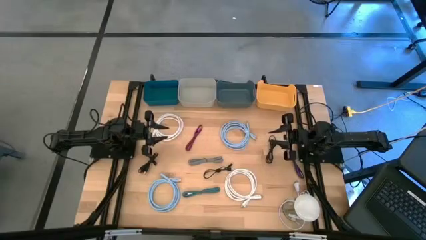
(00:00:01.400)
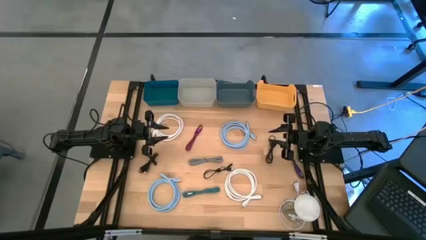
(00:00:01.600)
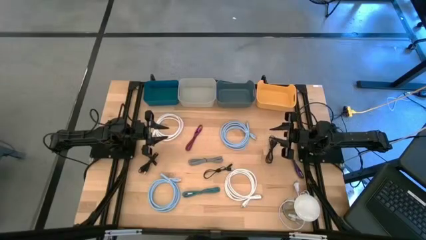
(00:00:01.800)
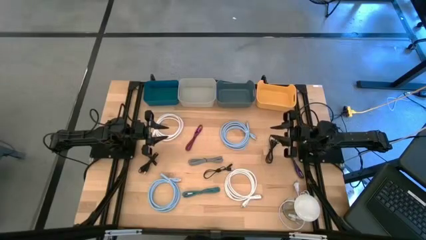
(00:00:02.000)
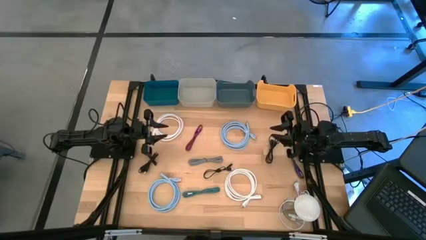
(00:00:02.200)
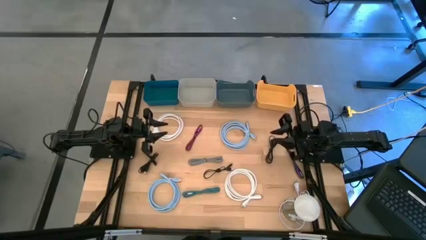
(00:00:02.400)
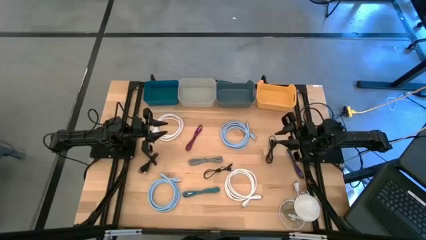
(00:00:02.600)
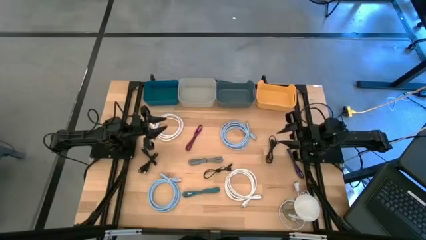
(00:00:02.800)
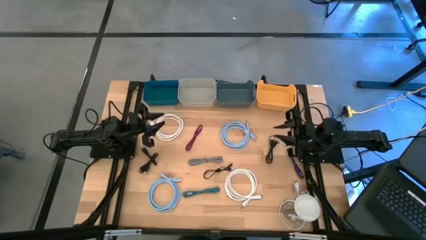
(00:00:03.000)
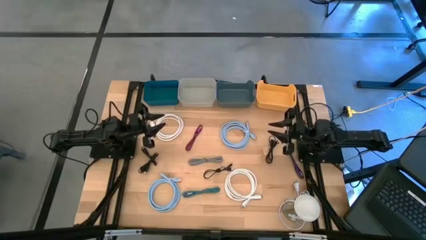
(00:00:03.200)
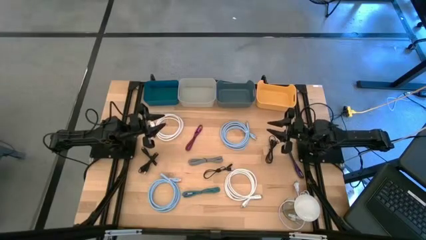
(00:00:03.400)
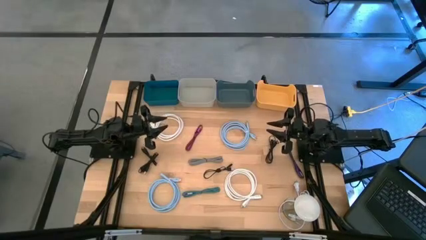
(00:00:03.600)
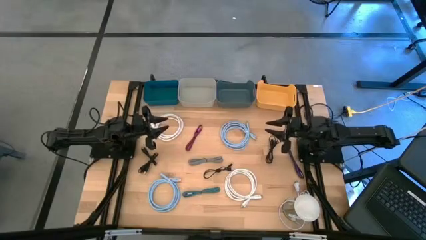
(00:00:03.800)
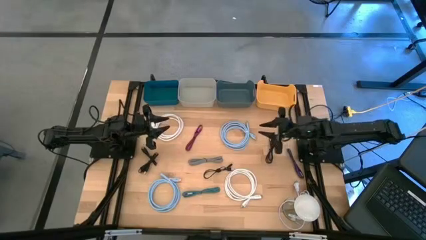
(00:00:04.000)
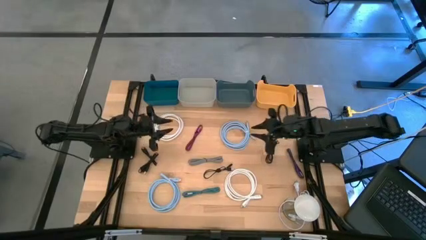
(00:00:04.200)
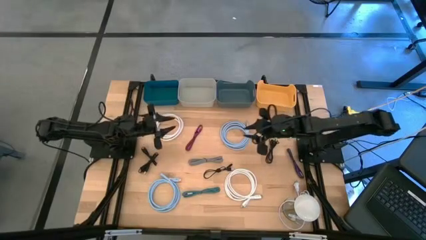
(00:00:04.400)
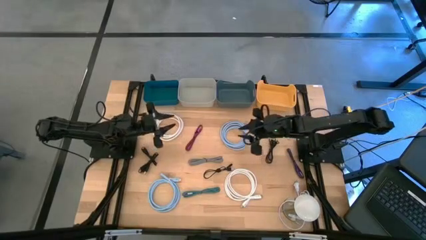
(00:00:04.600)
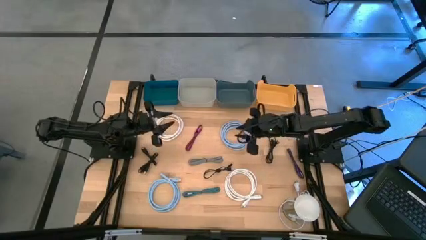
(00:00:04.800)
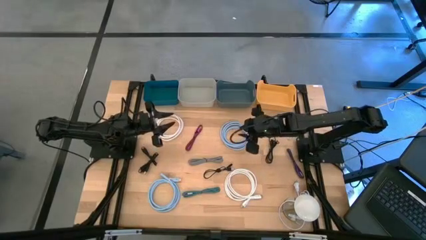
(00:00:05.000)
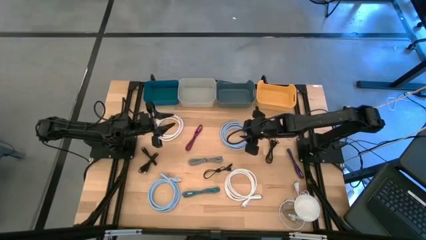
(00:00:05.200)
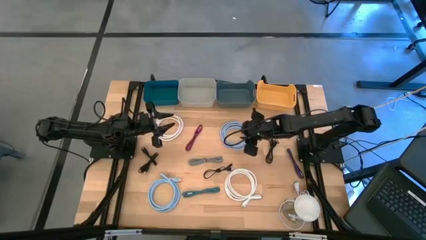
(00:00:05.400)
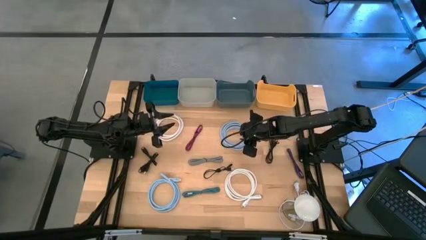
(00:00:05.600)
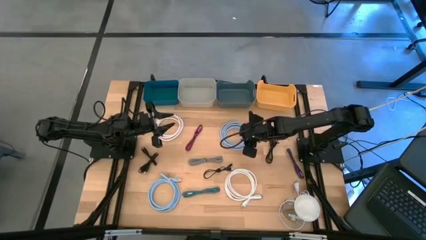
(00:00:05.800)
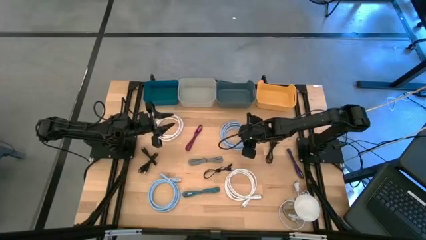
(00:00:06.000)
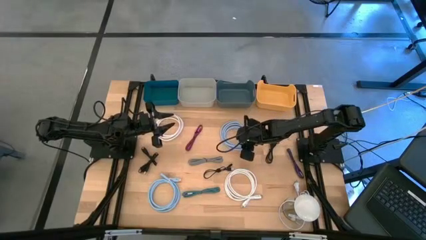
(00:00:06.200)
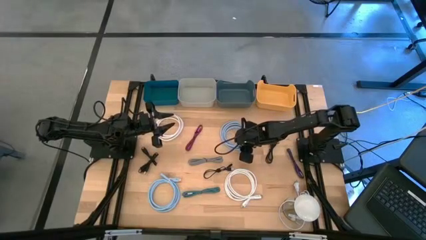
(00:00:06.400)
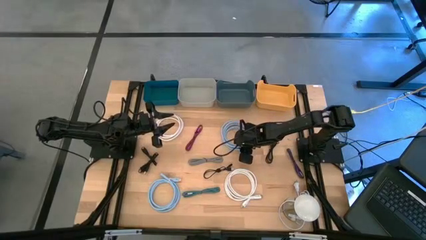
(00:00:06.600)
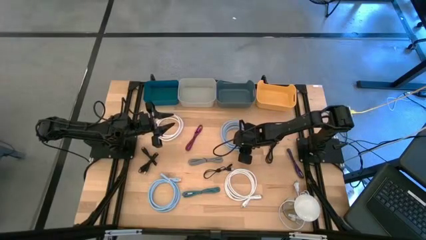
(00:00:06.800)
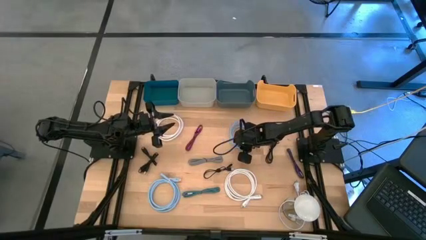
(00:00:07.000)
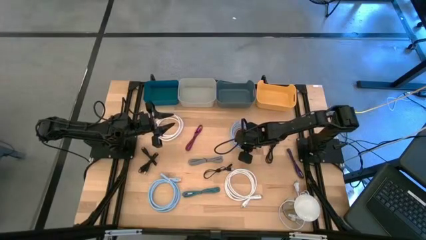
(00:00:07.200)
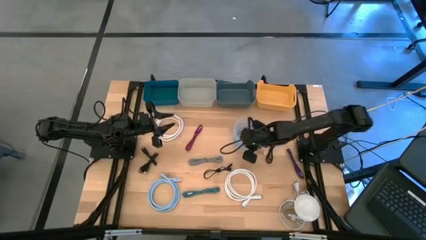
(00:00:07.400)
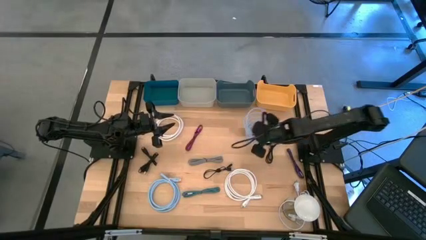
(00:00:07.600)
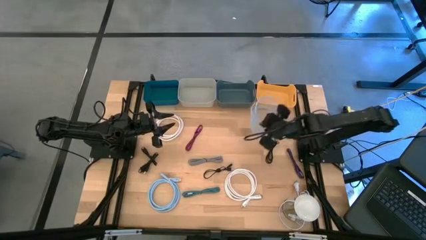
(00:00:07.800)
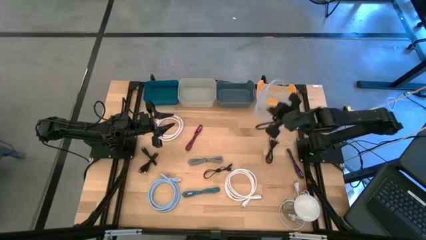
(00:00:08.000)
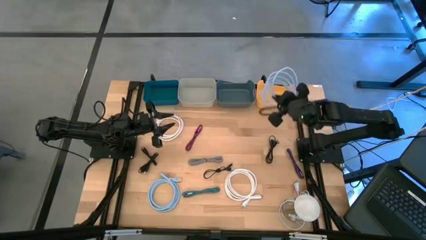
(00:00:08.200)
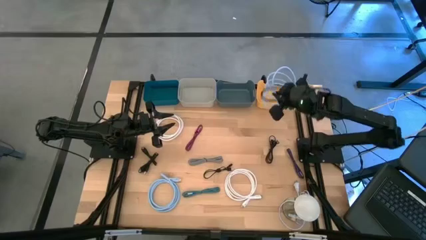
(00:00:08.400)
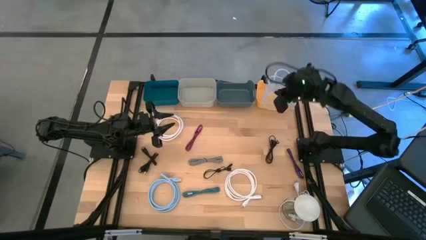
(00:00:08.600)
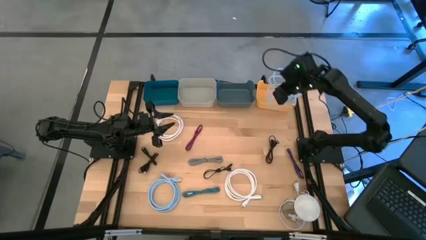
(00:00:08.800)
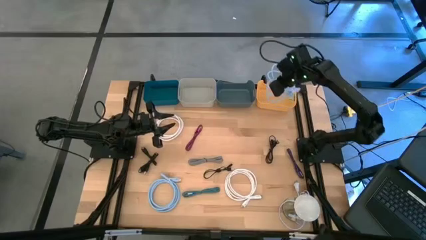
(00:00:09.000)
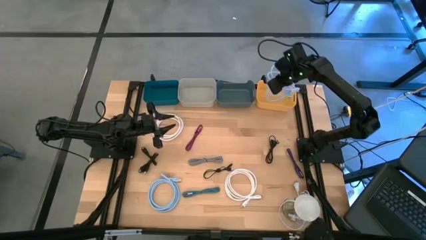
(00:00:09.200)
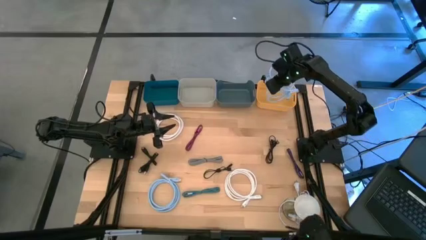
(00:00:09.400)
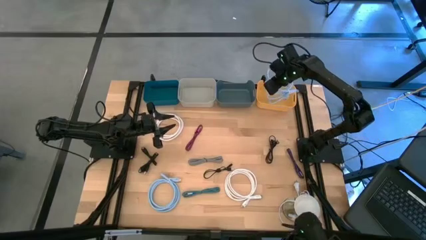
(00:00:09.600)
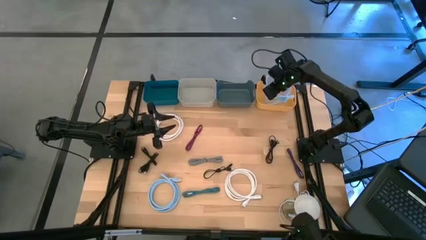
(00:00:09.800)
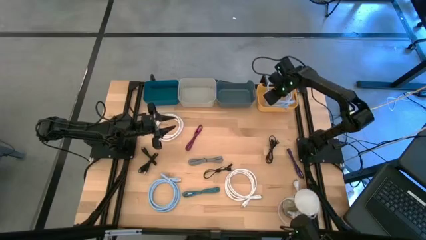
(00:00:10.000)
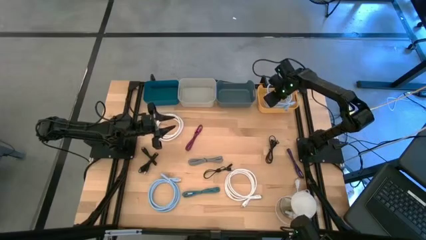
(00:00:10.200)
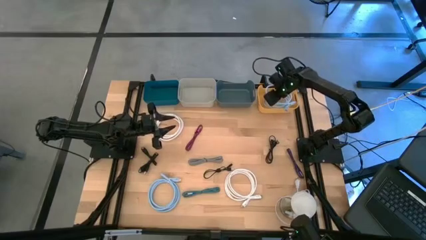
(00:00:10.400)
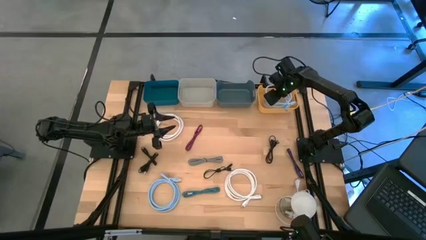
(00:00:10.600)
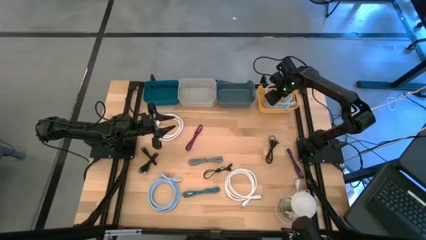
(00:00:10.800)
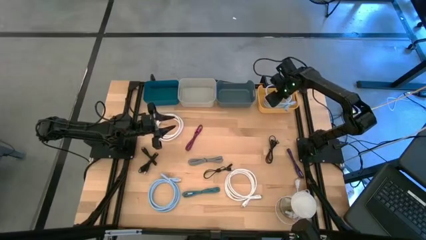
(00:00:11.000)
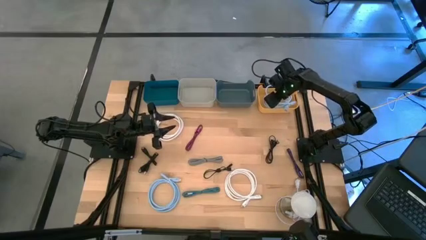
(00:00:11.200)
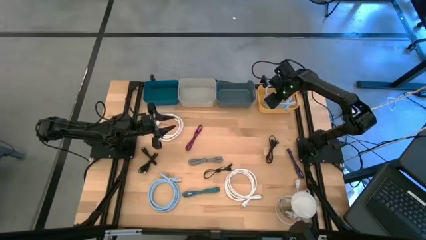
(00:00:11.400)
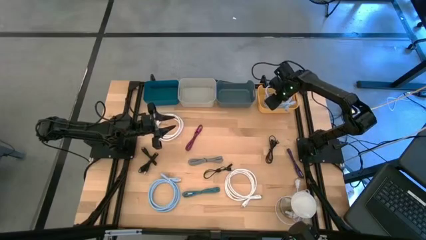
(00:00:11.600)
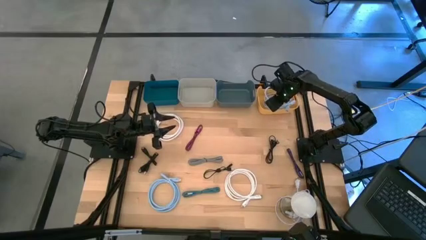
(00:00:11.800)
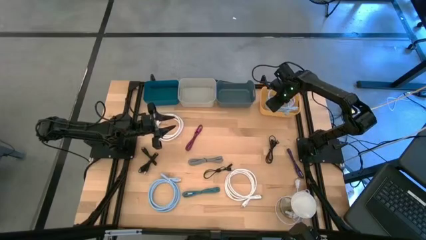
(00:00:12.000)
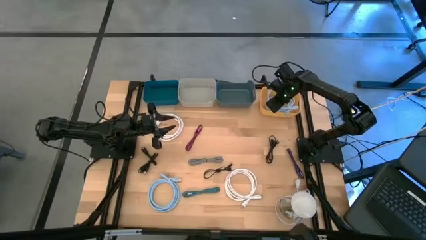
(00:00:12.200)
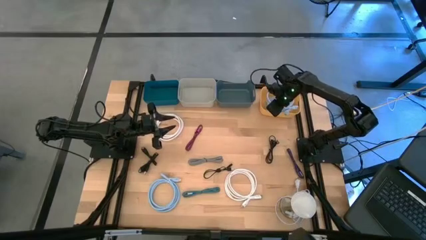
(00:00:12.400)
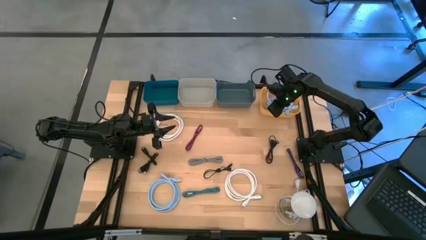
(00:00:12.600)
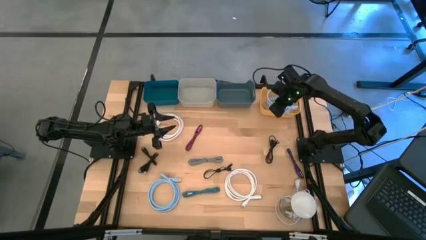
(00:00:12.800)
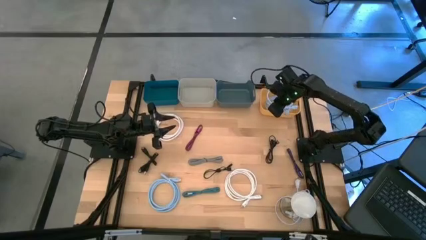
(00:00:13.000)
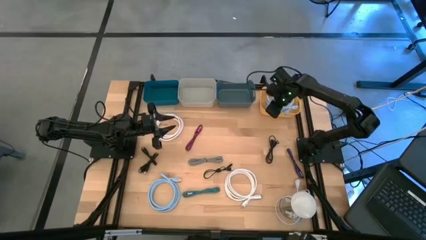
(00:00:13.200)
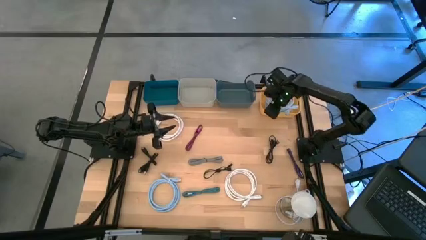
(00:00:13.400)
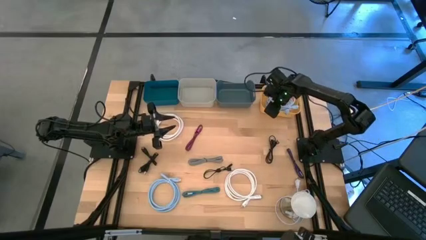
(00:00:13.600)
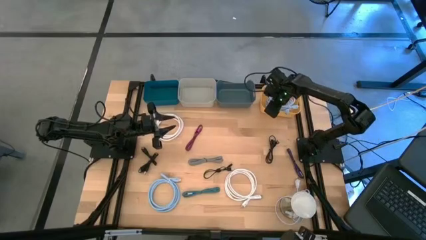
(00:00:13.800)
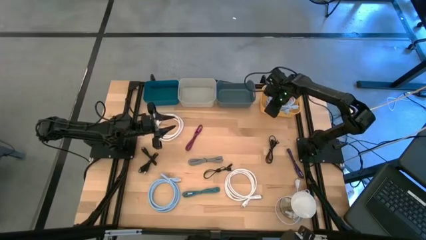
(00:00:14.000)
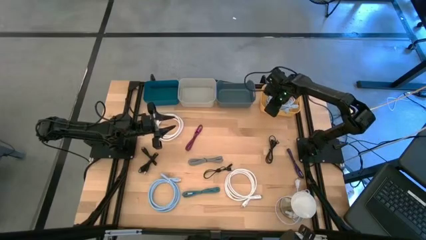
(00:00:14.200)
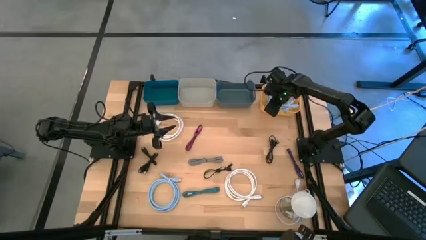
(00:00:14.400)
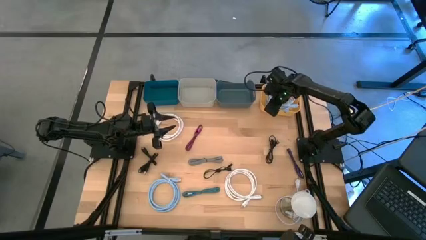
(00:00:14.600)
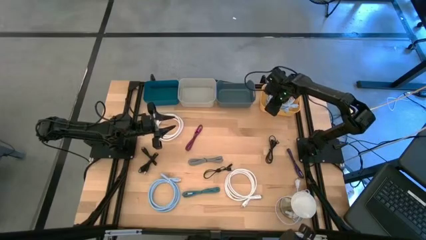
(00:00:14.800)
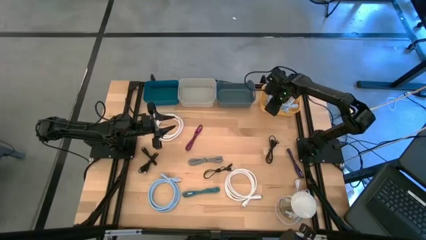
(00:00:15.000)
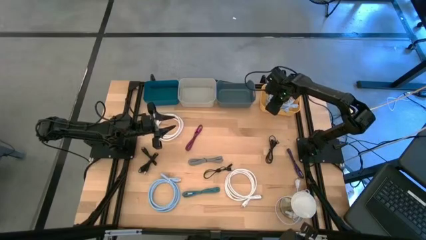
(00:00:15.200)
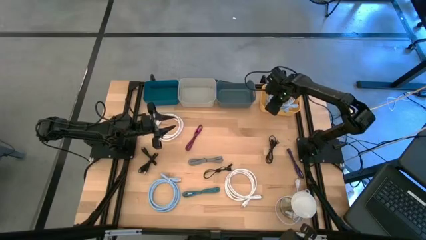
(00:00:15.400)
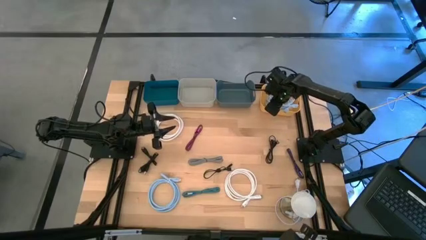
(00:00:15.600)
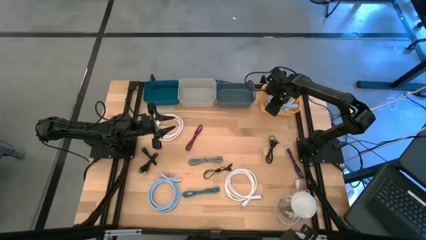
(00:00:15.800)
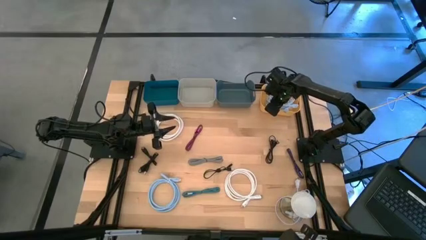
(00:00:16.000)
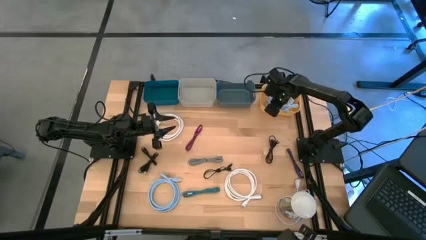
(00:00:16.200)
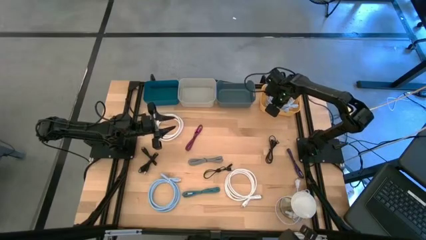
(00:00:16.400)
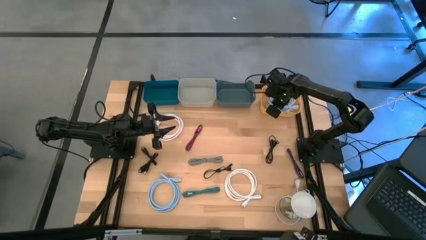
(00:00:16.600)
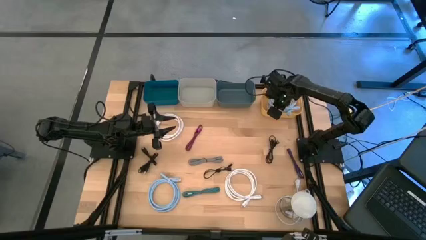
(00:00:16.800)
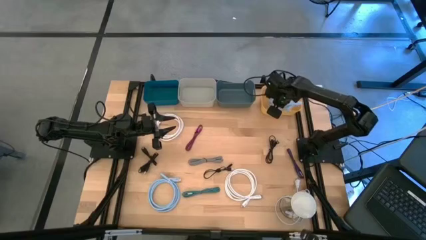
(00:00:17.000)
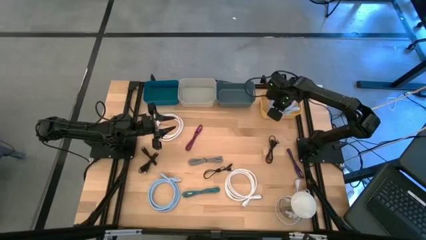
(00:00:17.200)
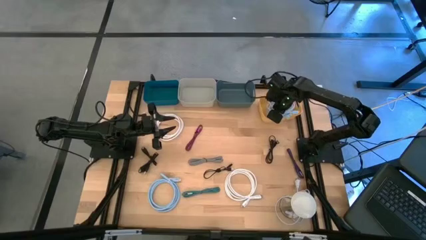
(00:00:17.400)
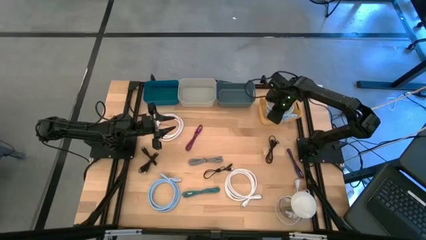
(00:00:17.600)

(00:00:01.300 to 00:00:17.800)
Task: Pick & Place USB Port
Put the blue HDMI cable into the yellow bin

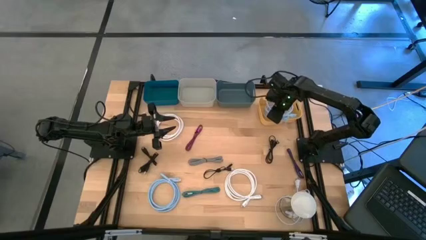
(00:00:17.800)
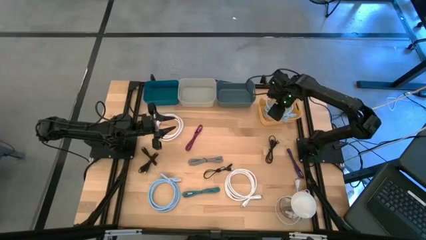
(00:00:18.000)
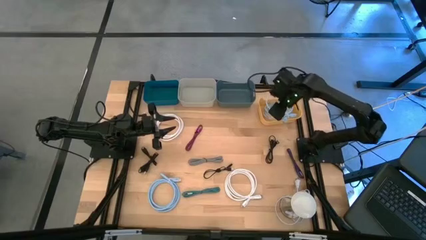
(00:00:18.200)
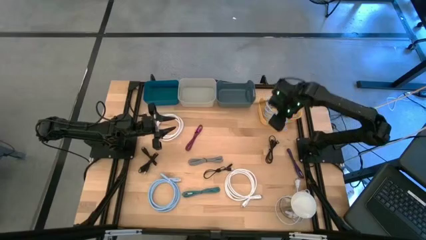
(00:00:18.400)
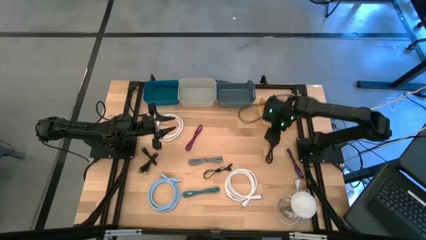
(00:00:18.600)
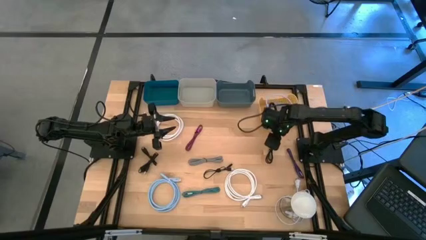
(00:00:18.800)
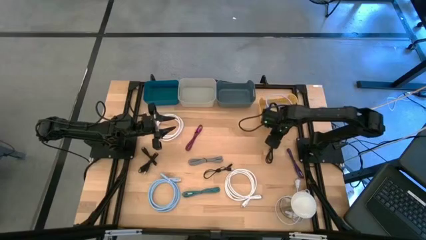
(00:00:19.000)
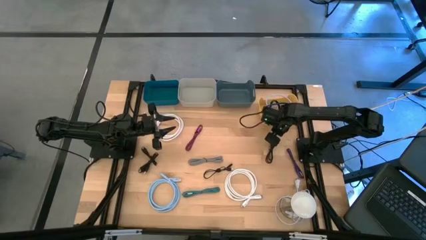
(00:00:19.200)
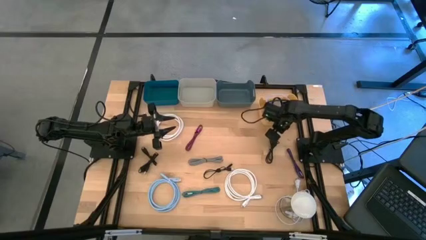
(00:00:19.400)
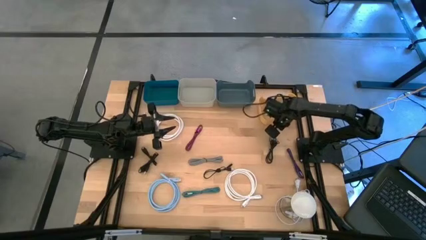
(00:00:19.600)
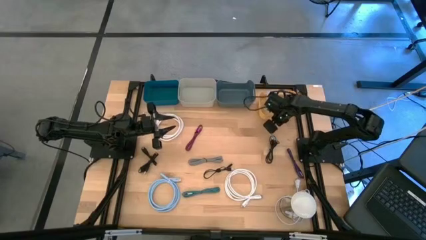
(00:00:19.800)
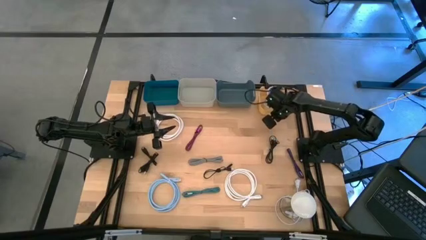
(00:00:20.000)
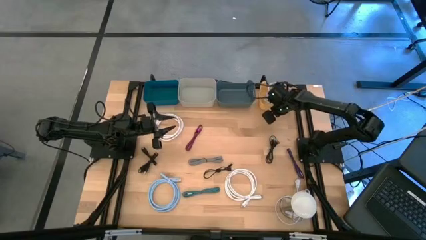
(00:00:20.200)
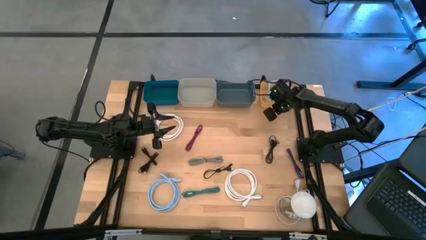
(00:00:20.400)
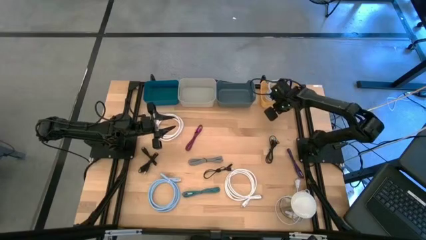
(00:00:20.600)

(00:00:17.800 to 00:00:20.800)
Adjust the yellow bin
